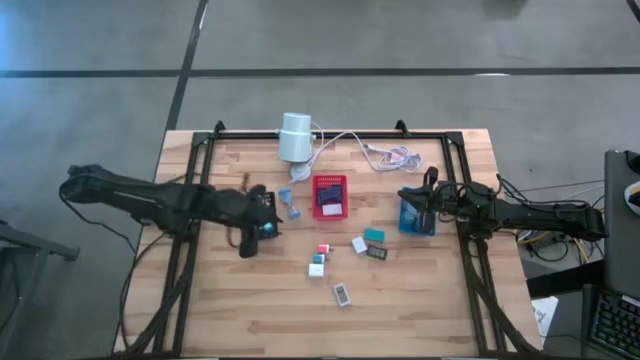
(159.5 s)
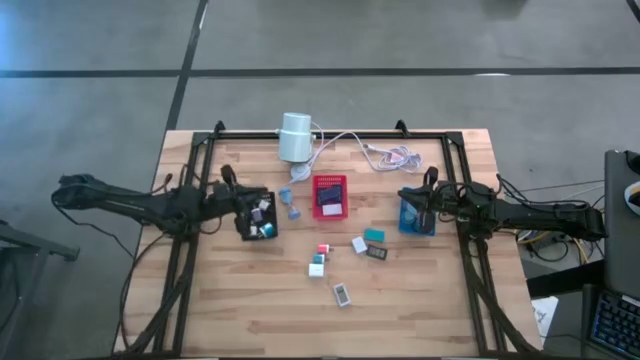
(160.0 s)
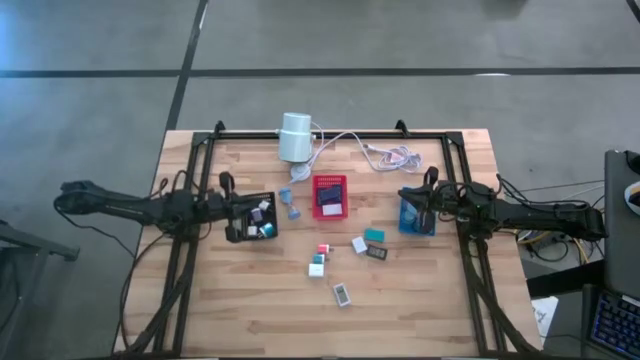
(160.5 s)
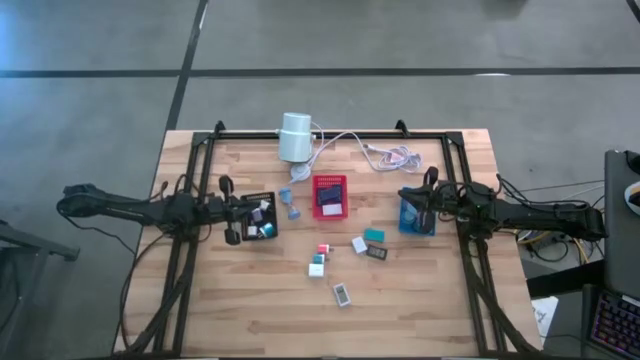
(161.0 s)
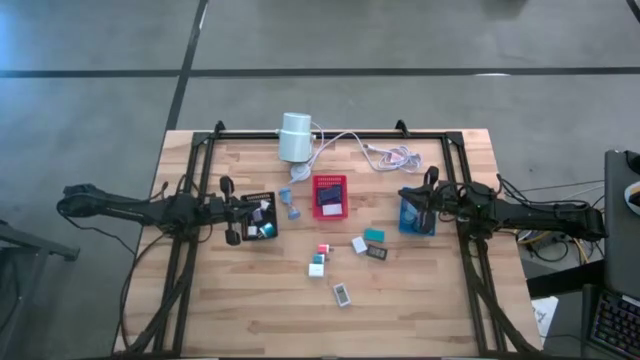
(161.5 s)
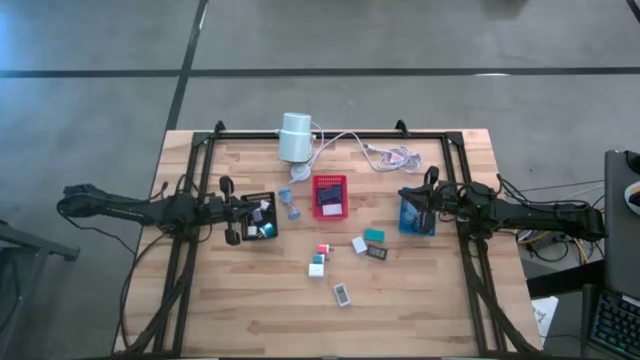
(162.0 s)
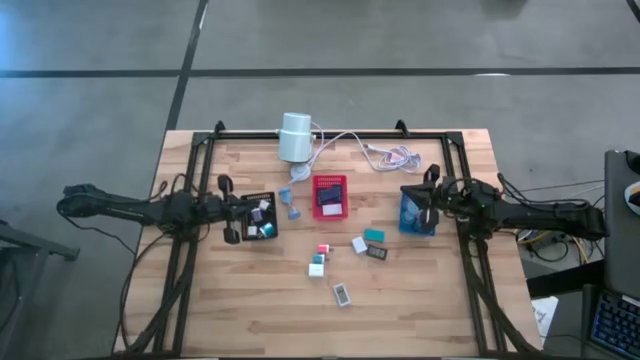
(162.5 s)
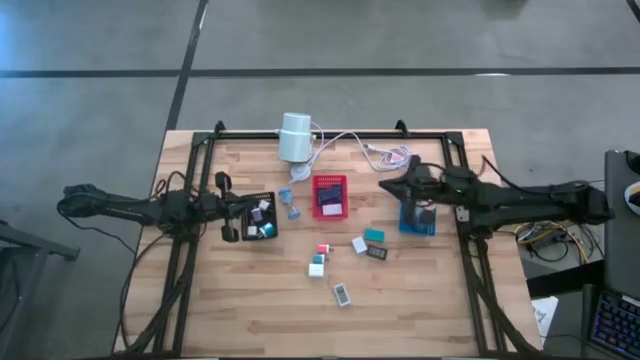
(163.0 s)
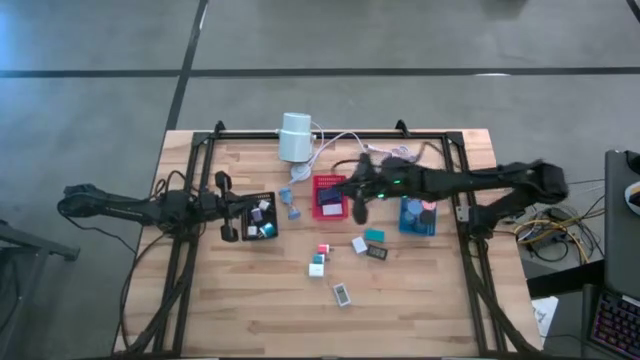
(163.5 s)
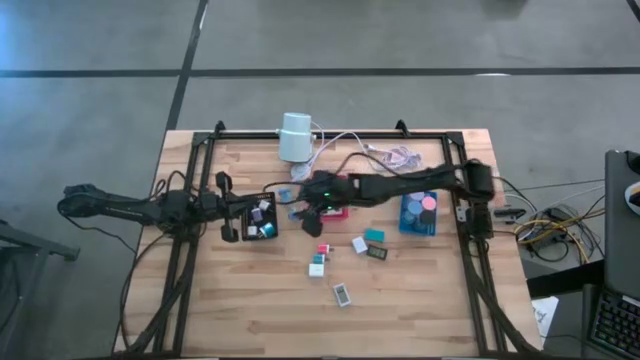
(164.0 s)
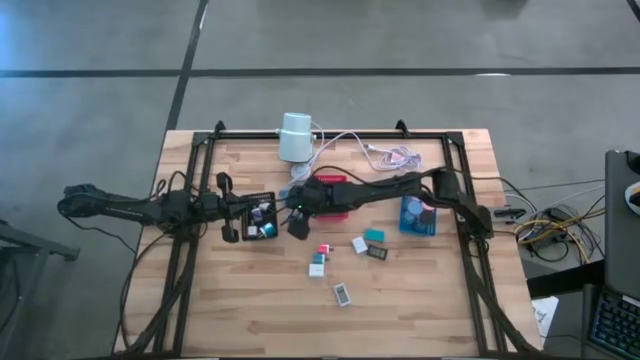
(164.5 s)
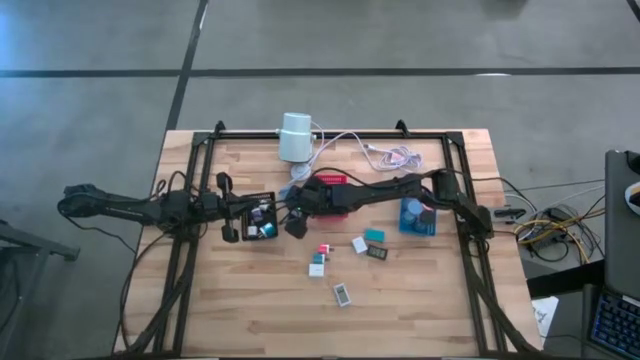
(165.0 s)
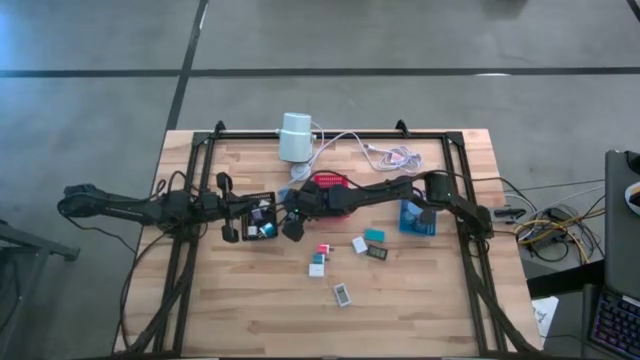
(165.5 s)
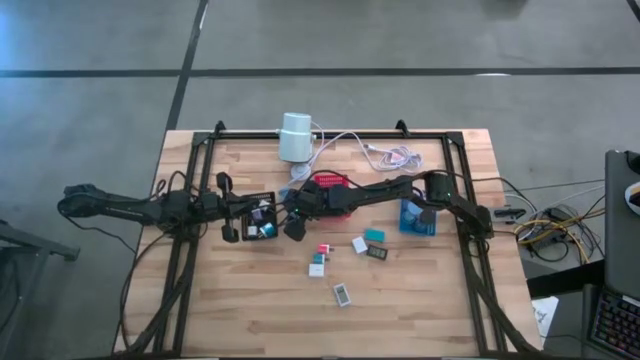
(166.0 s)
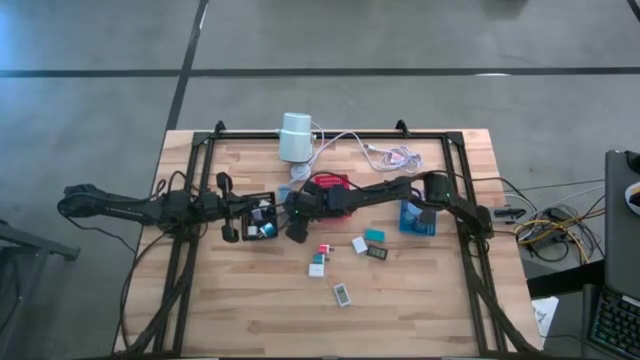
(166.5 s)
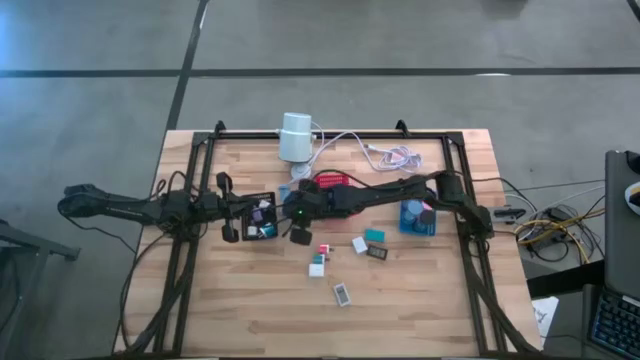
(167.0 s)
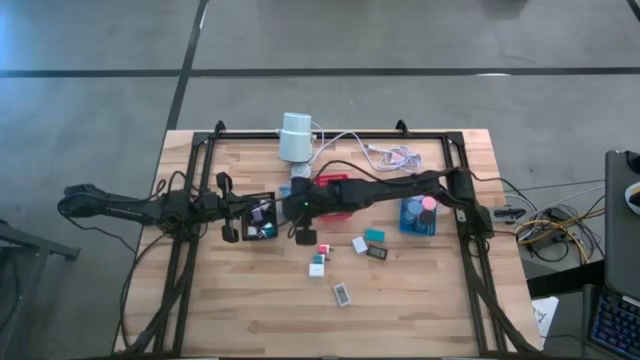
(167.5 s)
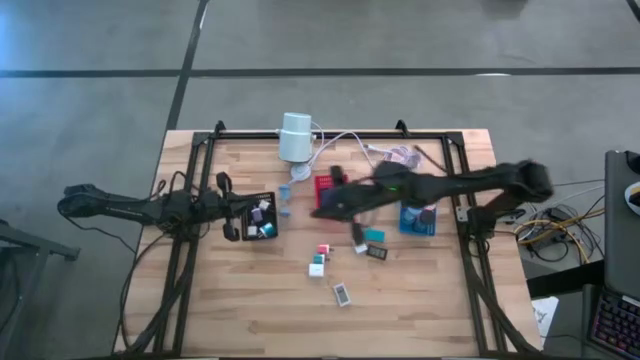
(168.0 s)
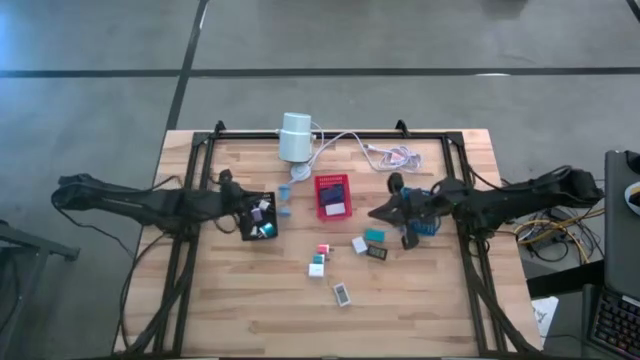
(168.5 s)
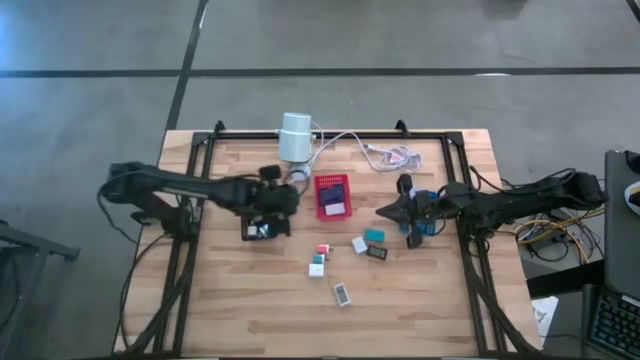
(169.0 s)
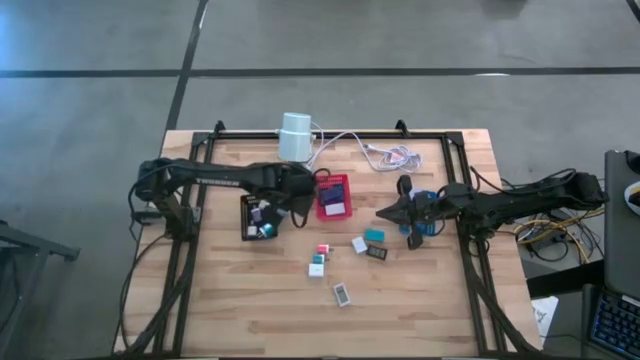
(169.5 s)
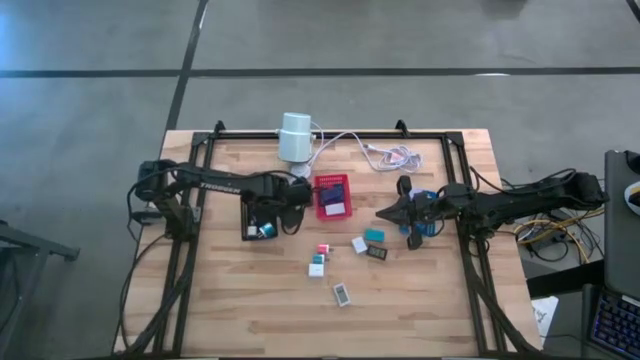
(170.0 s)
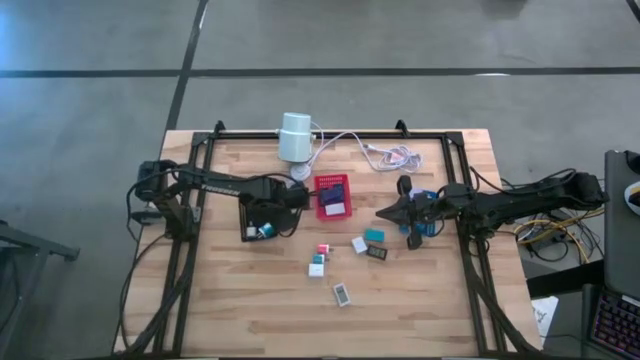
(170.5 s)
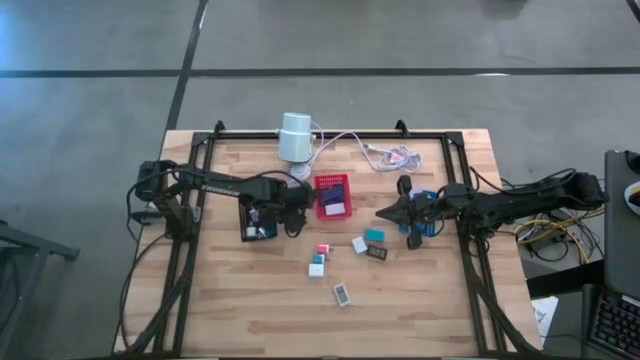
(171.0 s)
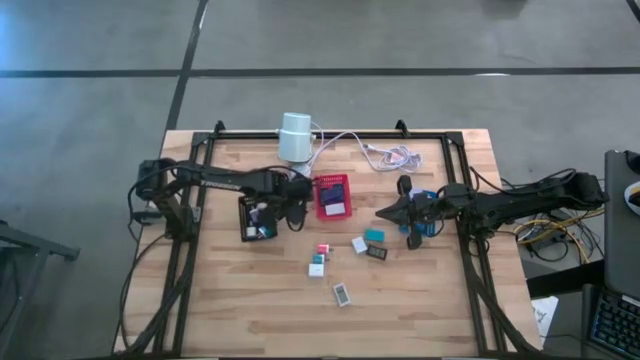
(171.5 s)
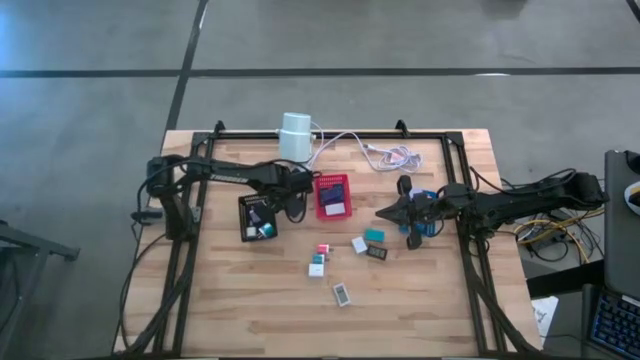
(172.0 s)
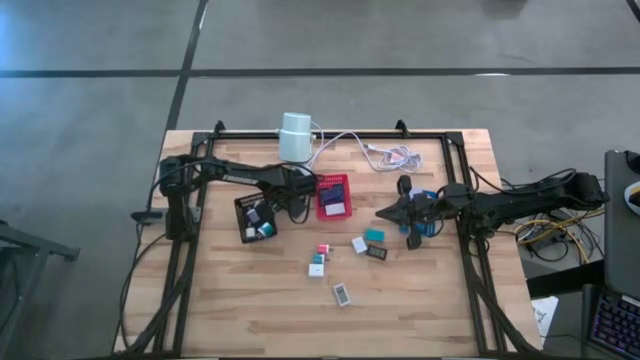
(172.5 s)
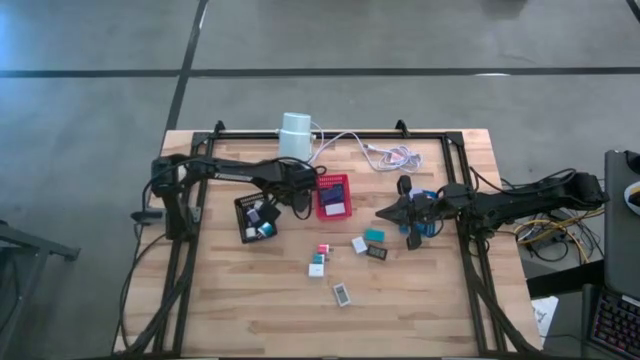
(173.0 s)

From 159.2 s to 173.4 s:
Task: Pick & Place Office items
Put the light blue hourglass into the blue basket

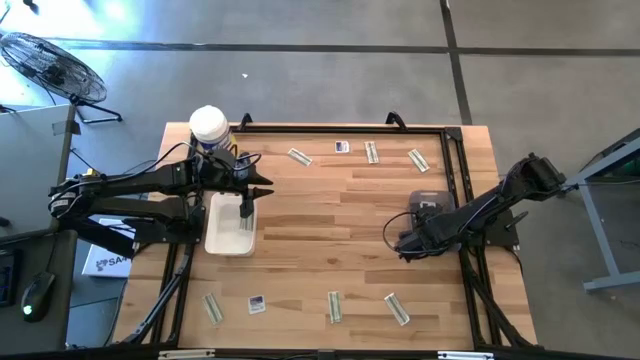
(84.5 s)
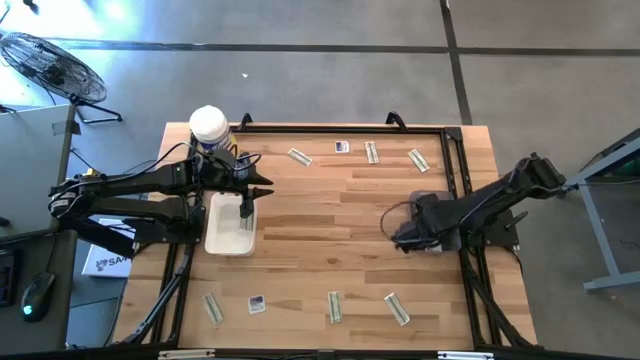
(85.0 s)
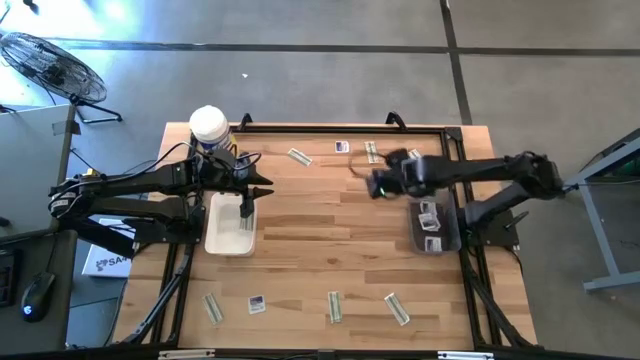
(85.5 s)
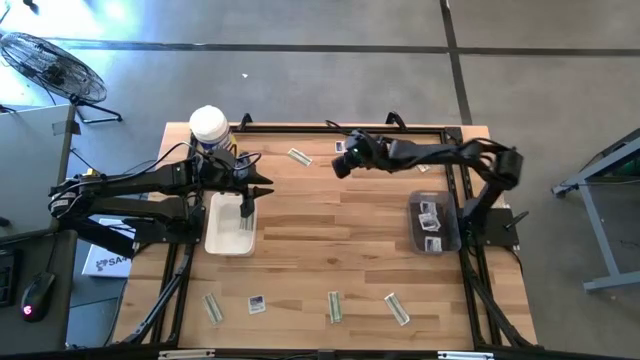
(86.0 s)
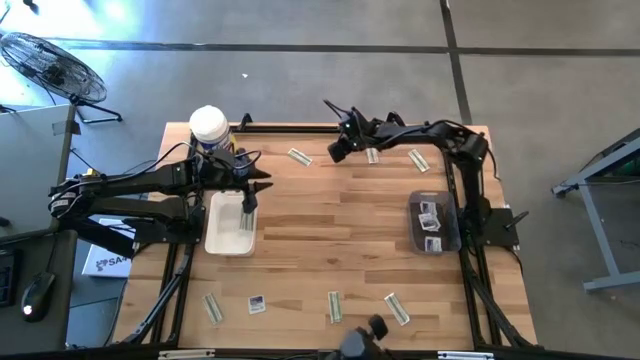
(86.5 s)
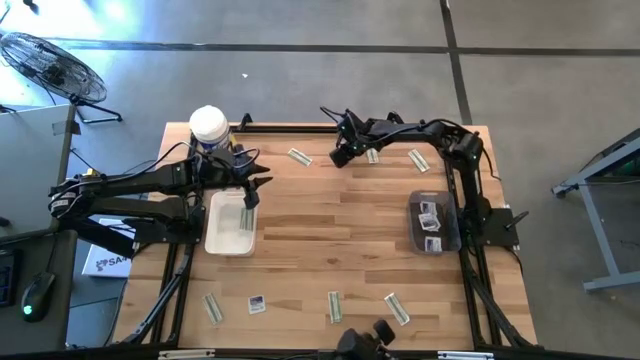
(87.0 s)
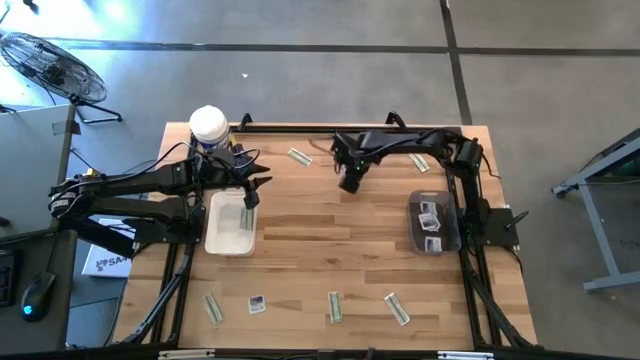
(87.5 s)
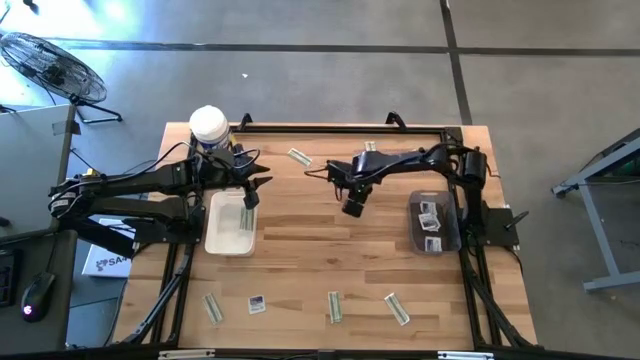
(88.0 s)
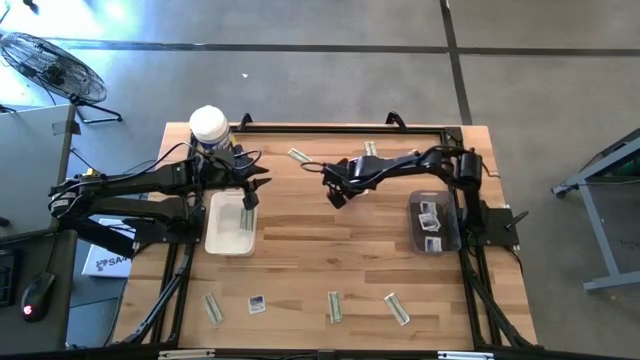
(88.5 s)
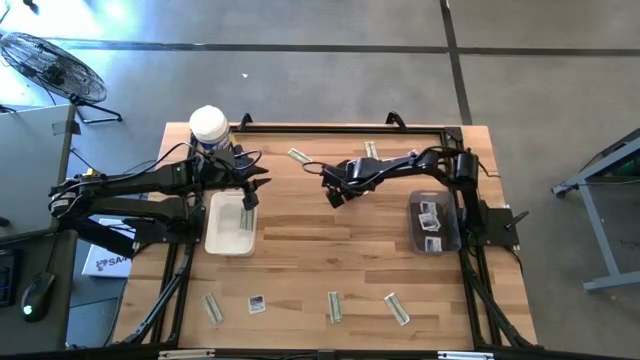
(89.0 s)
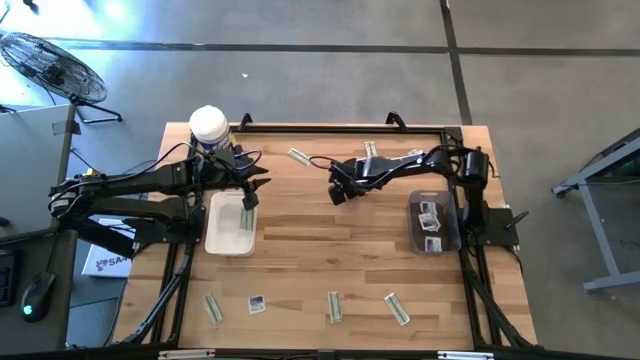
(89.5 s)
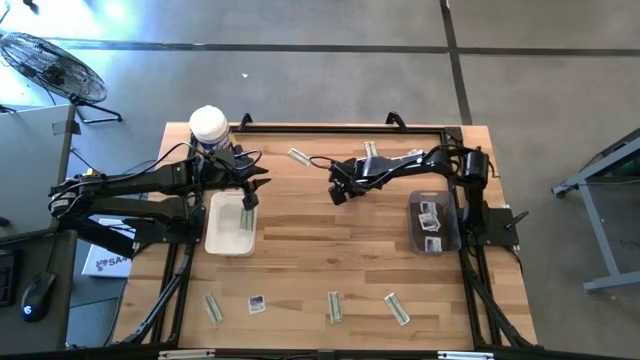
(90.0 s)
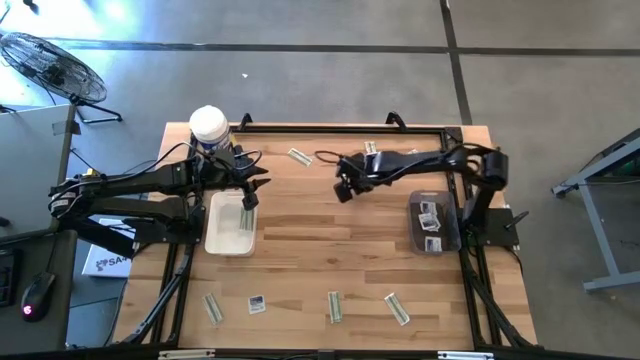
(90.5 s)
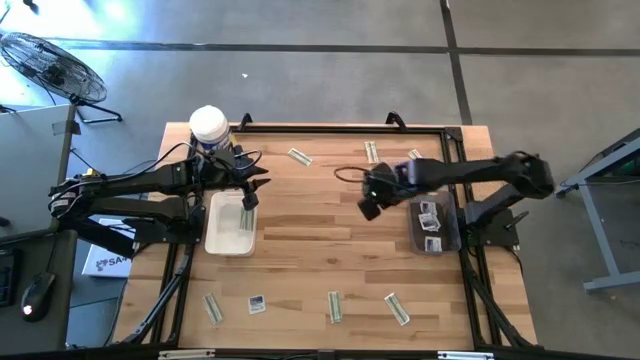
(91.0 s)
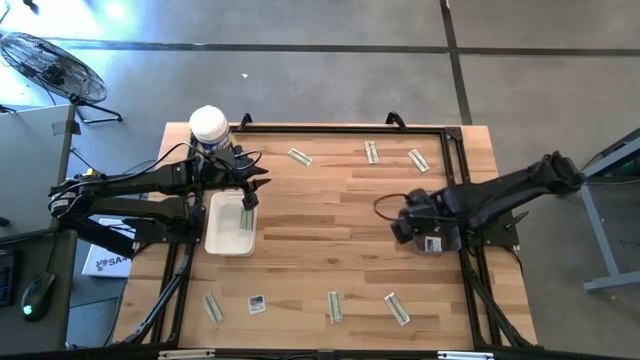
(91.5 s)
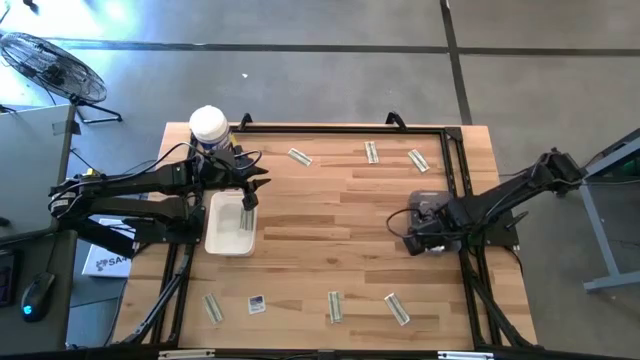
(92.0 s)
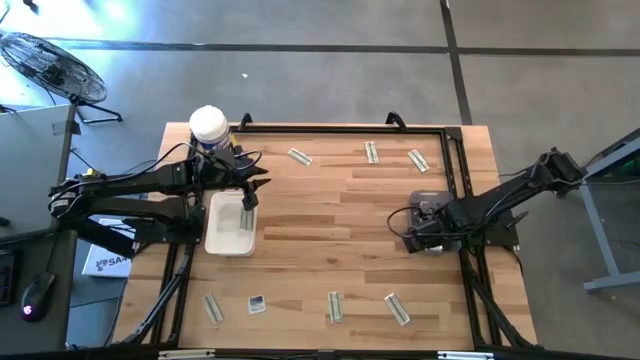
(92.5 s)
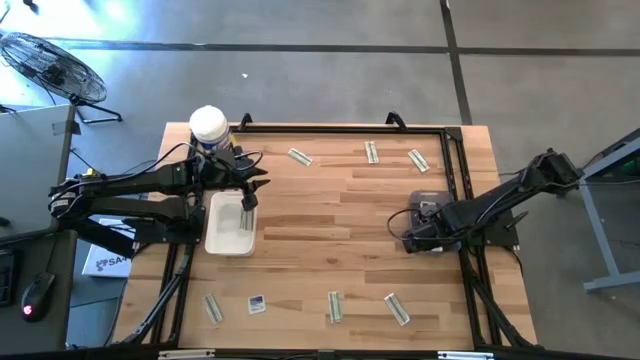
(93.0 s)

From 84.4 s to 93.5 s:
Task: Pick & Place First Aid Supplies
Put the blue alcohol pad into the black bin
